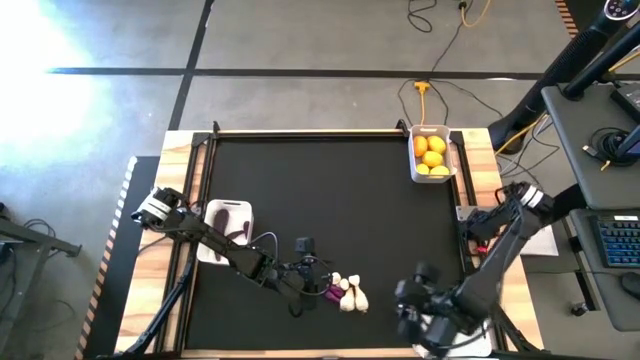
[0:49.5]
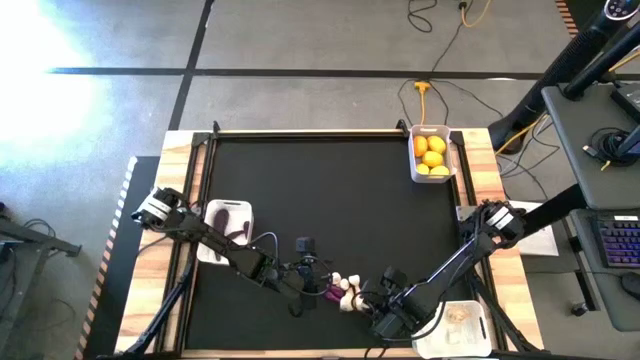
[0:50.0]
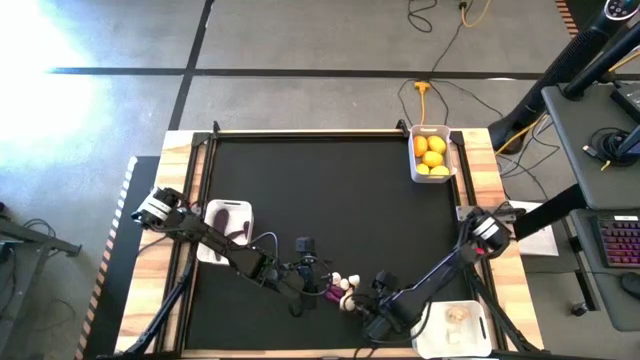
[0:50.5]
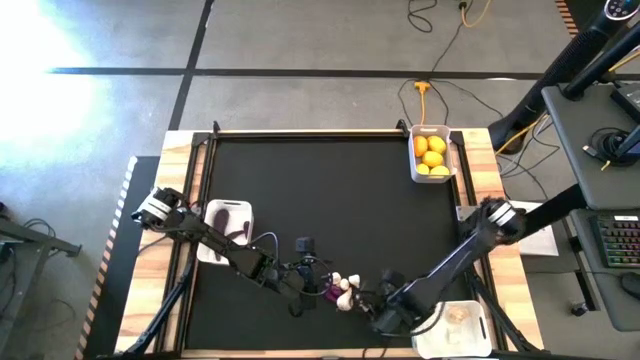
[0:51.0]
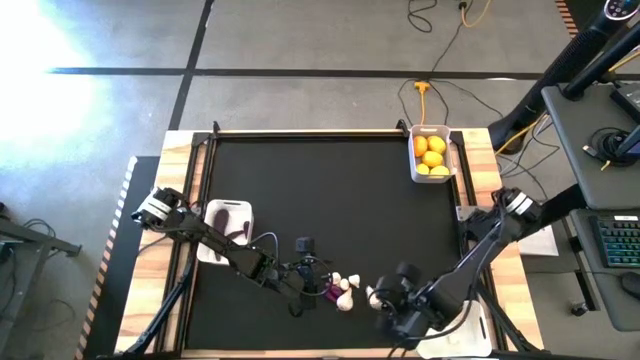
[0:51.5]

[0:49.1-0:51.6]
Task: Sort produce into baskets
Put the garlic into the bottom white bin

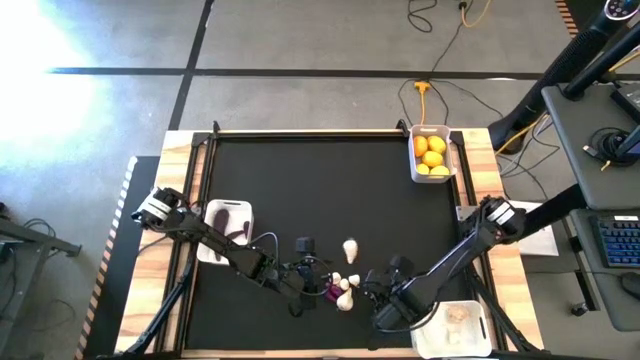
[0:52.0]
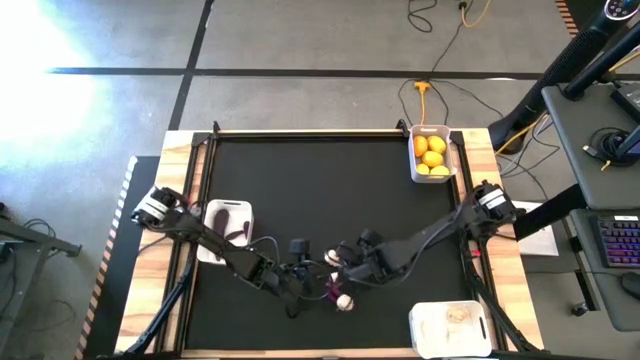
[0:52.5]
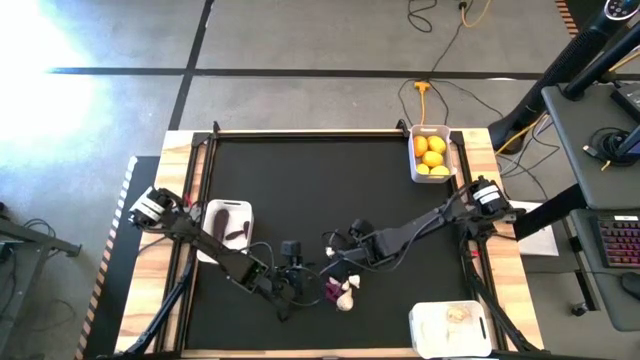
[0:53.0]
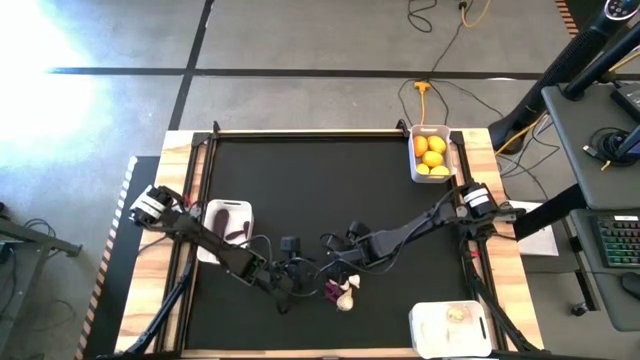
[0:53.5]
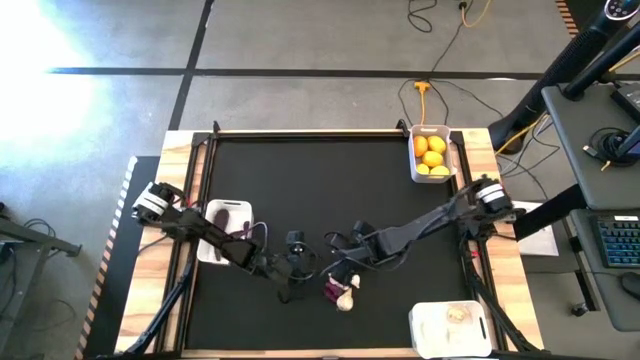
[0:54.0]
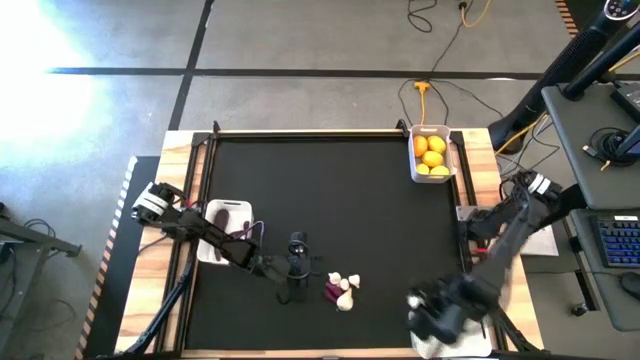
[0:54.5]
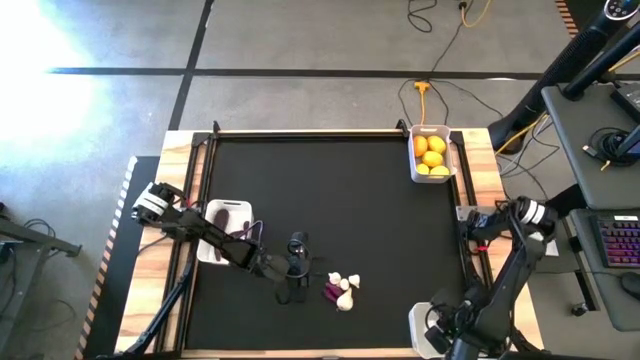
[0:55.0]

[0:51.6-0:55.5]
Put the garlic into the bottom white bin

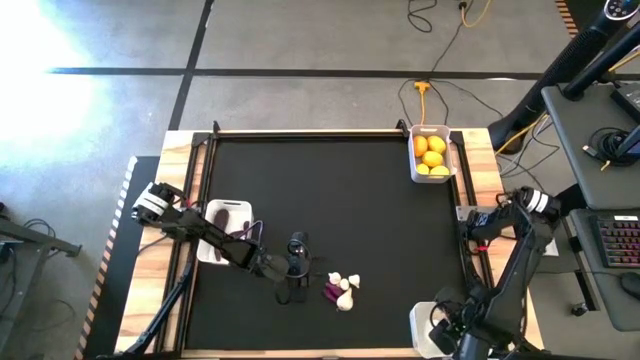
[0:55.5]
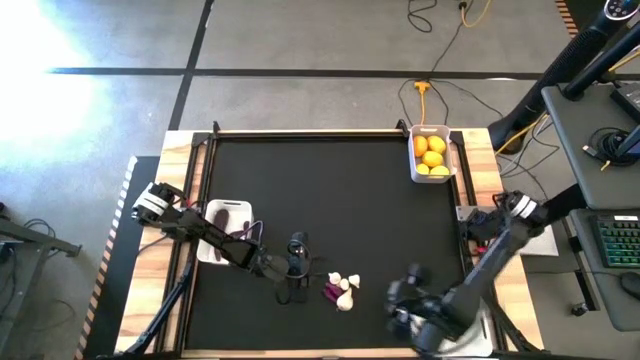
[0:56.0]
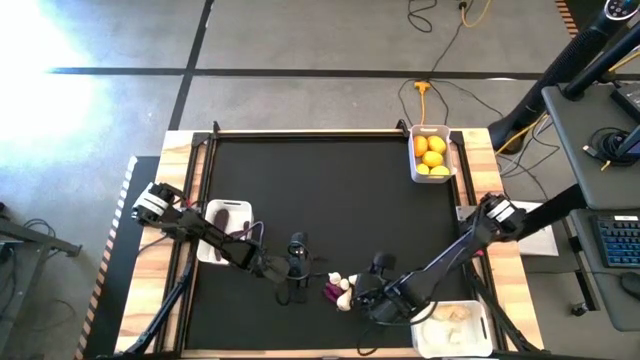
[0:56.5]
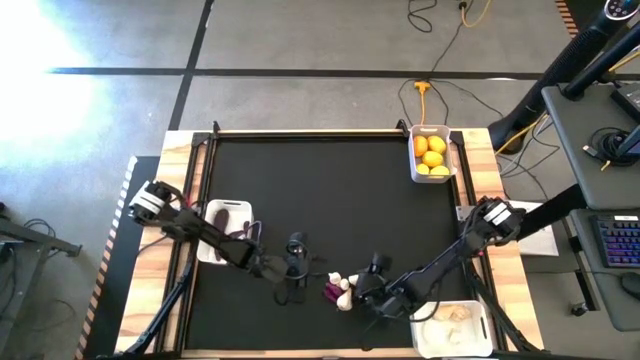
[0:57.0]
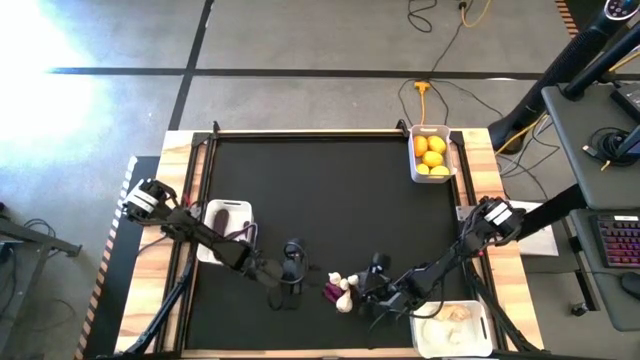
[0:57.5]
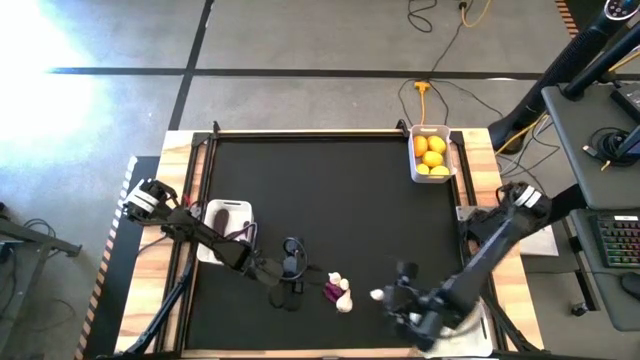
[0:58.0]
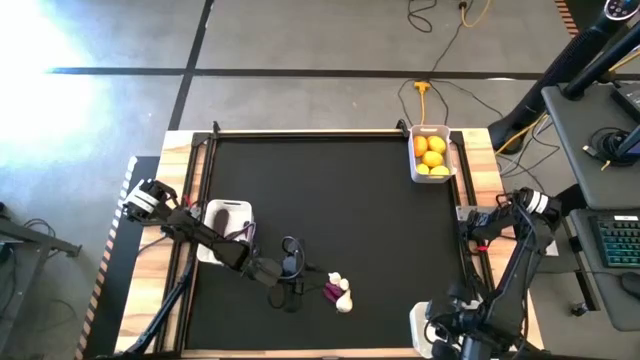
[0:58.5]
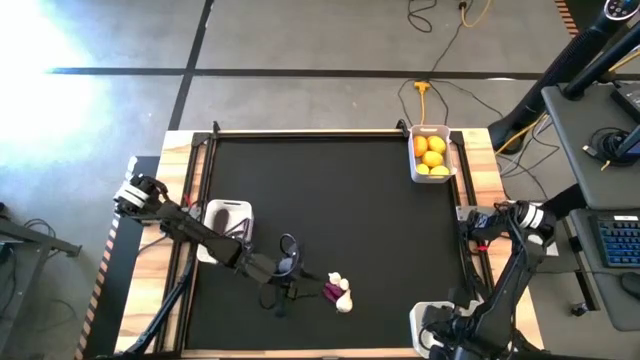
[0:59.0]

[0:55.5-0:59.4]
Put the garlic into the bottom white bin

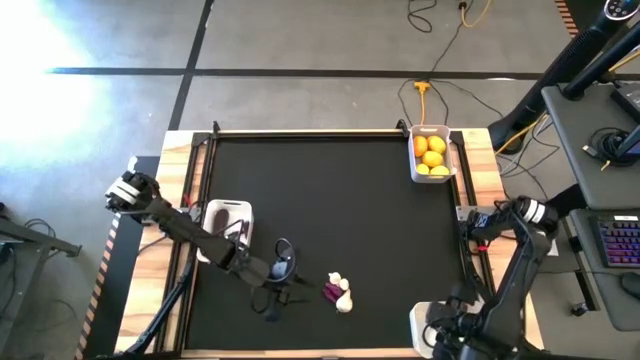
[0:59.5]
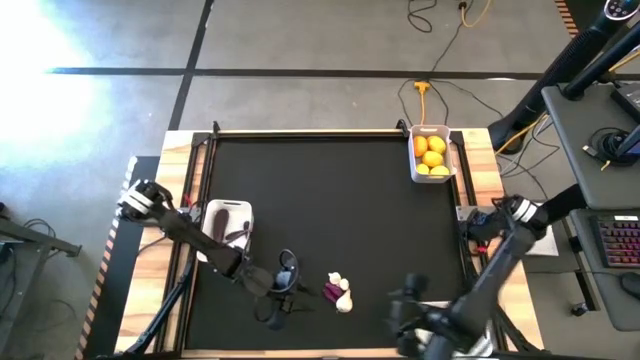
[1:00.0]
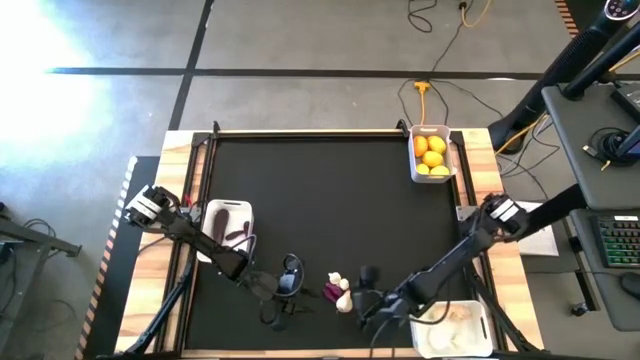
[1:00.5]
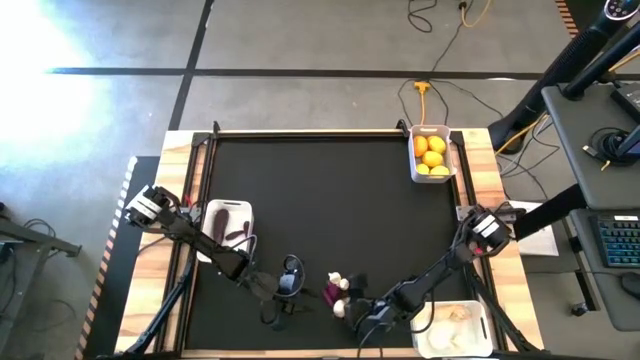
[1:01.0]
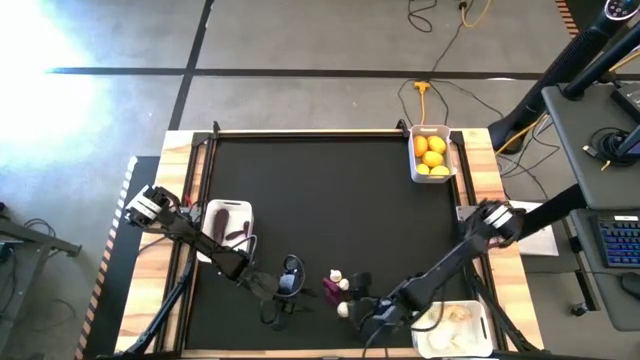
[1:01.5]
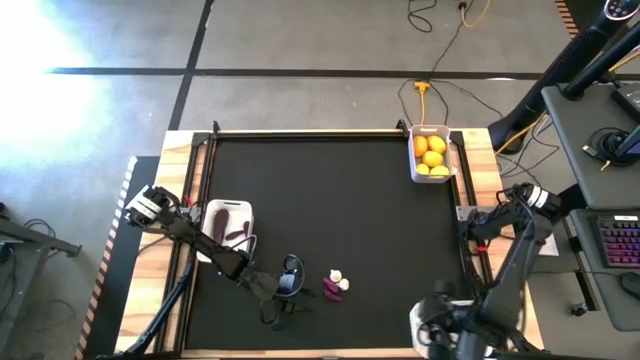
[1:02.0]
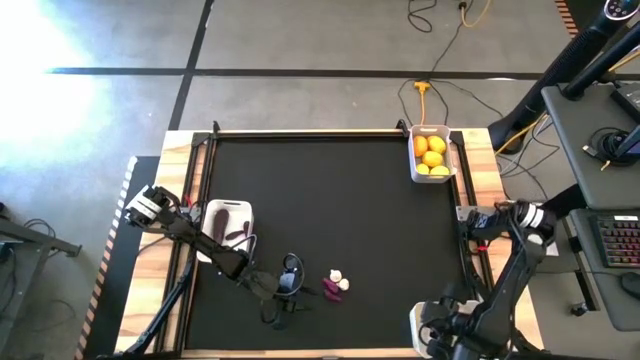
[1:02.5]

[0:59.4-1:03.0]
Put the garlic into the bottom white bin

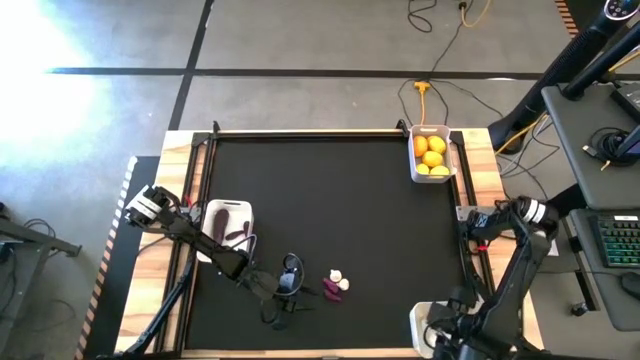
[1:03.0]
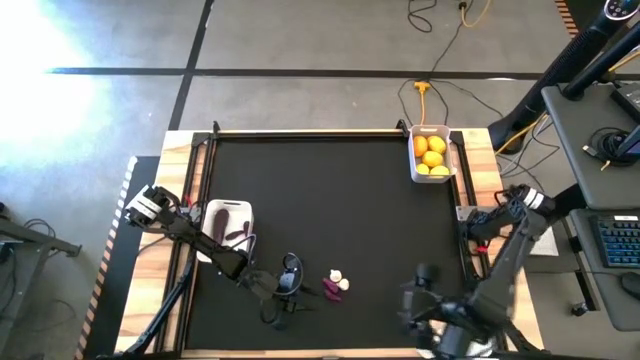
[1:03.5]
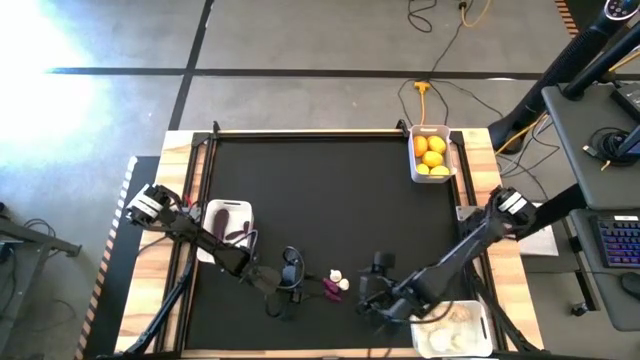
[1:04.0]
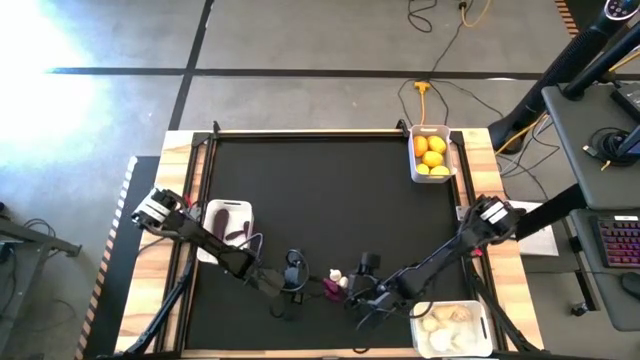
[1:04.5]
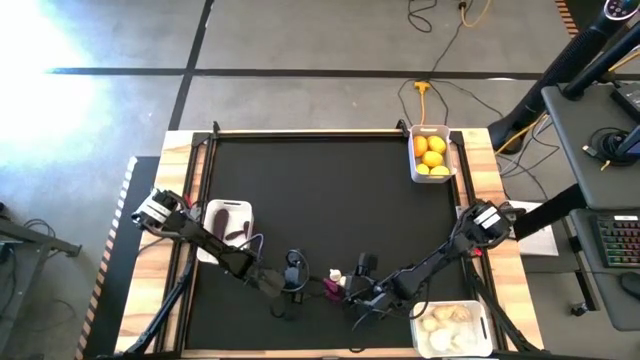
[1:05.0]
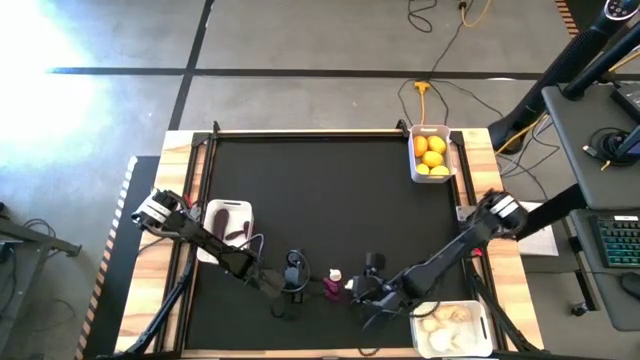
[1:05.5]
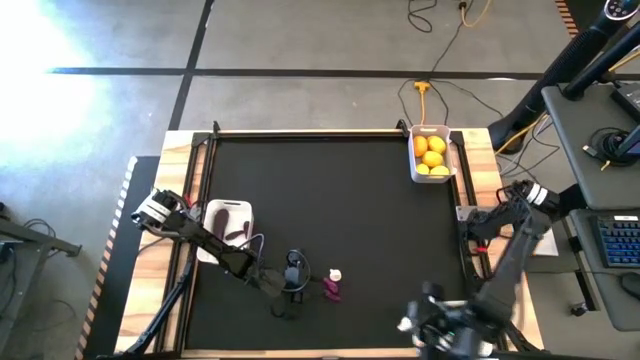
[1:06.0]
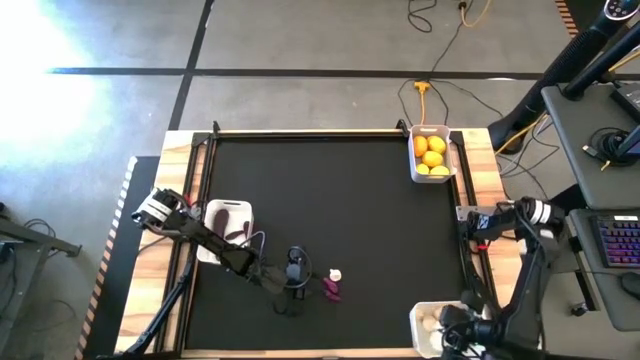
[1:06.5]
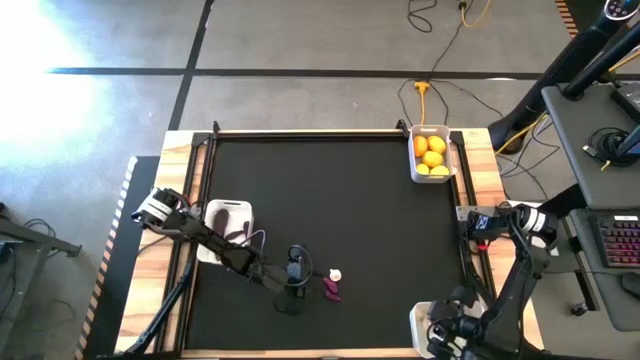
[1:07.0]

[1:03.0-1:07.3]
Put the garlic into the bottom white bin

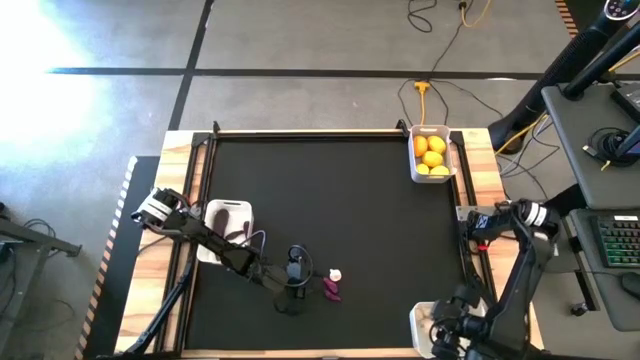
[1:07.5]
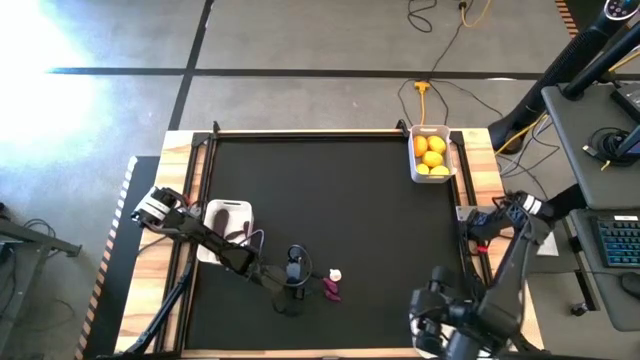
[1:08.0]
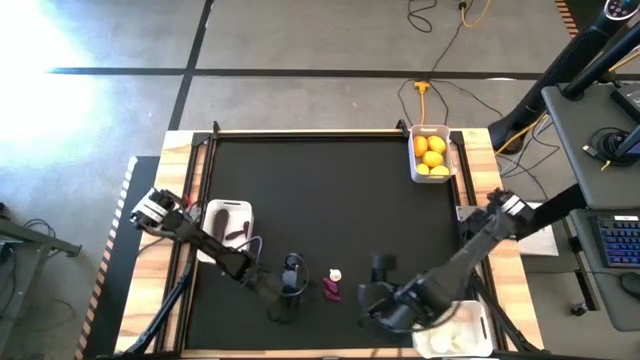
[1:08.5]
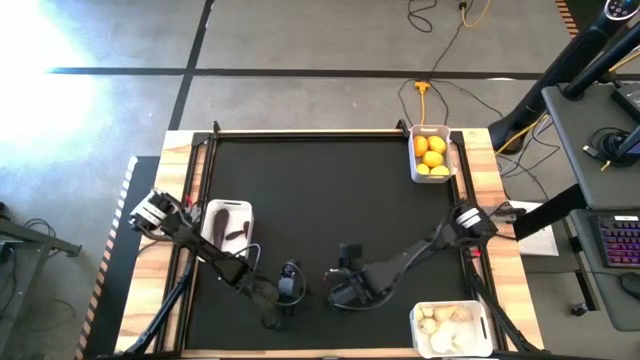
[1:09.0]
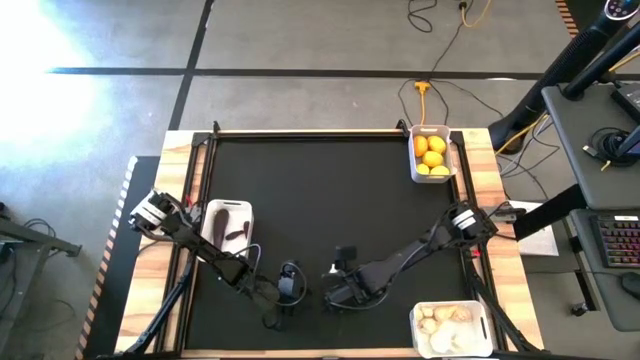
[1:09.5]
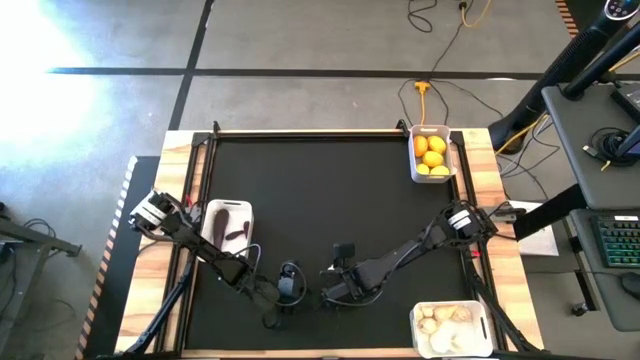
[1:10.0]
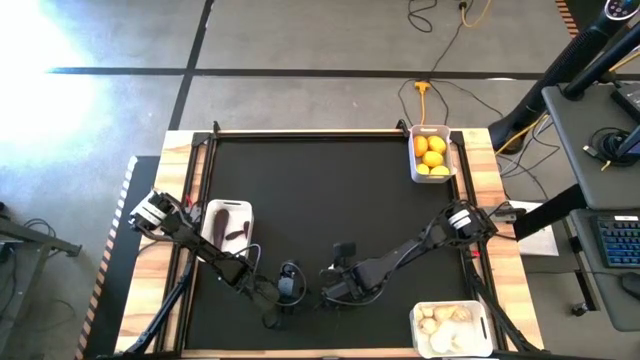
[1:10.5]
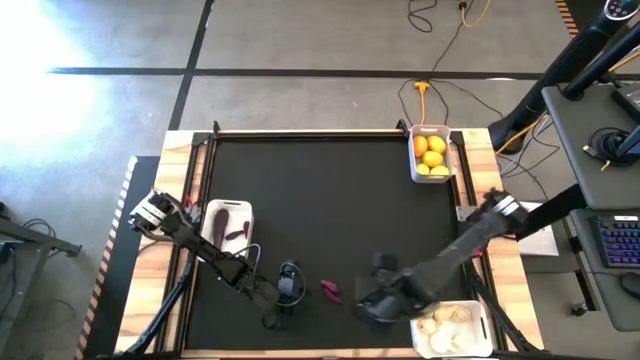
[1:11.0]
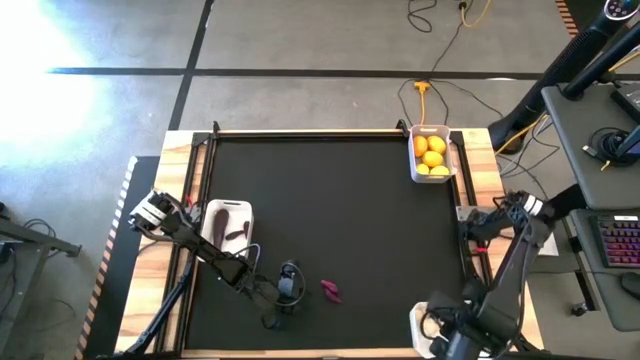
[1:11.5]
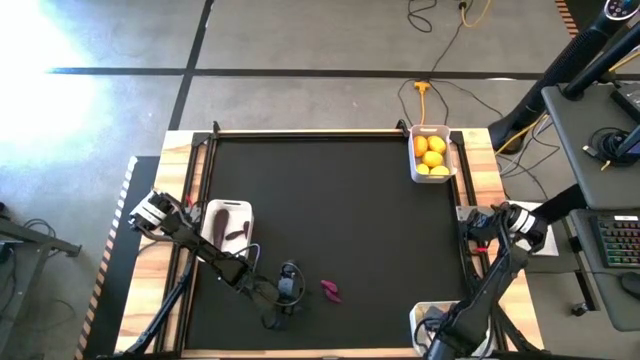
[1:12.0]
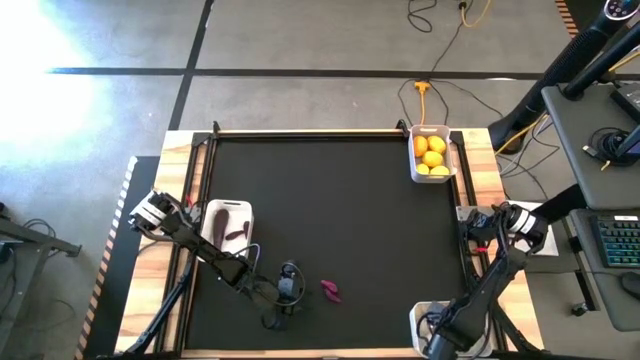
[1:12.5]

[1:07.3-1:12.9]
Put the garlic into the bottom white bin
